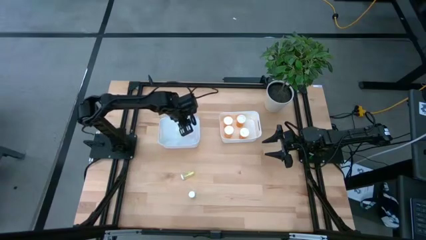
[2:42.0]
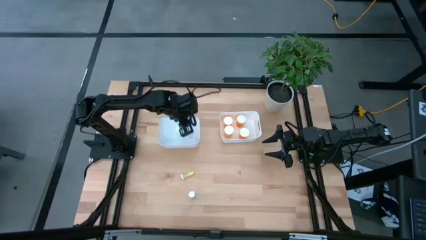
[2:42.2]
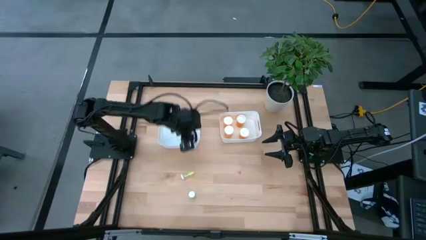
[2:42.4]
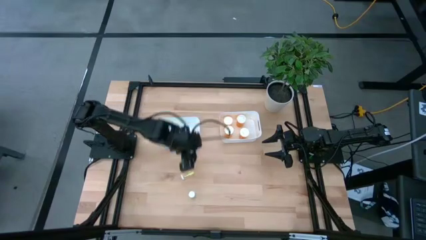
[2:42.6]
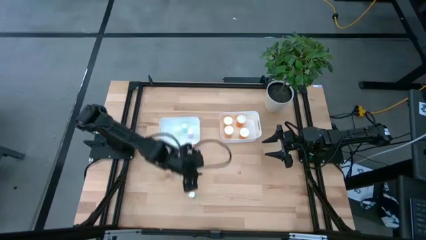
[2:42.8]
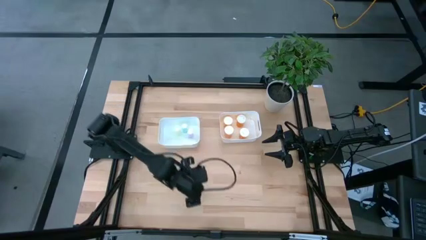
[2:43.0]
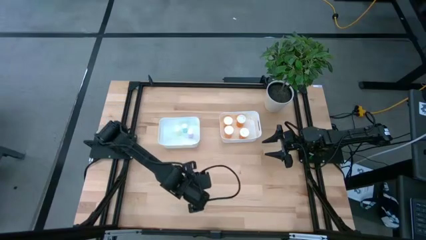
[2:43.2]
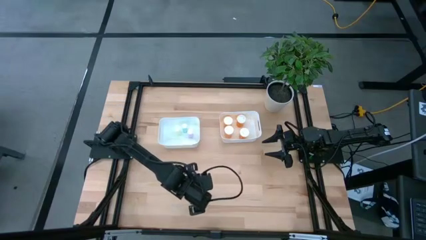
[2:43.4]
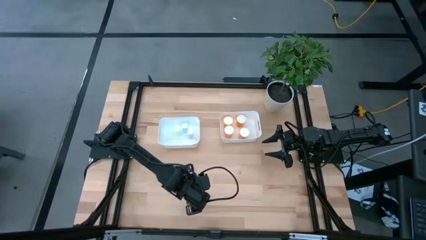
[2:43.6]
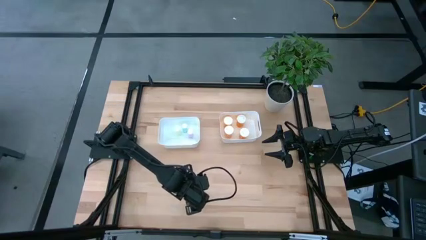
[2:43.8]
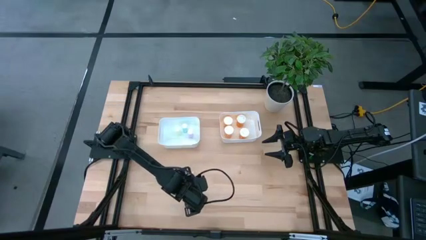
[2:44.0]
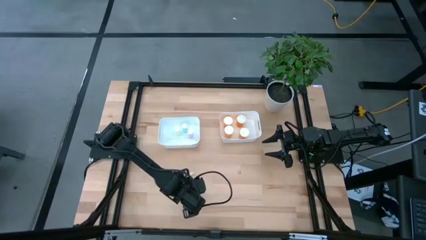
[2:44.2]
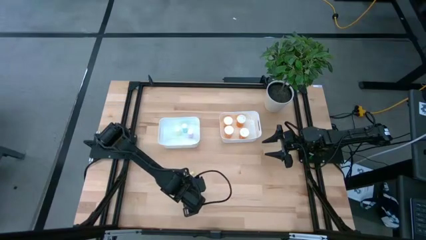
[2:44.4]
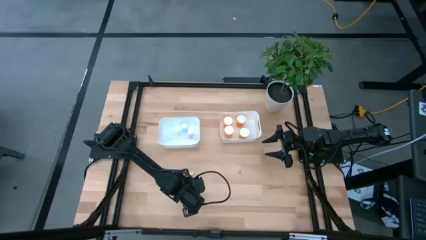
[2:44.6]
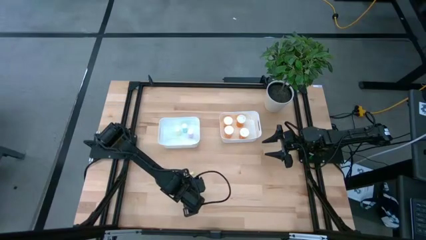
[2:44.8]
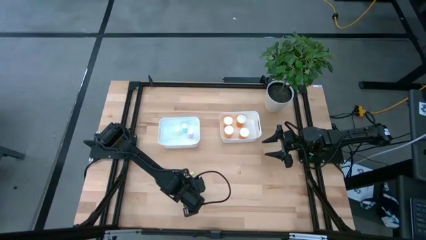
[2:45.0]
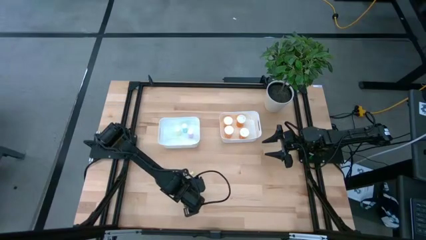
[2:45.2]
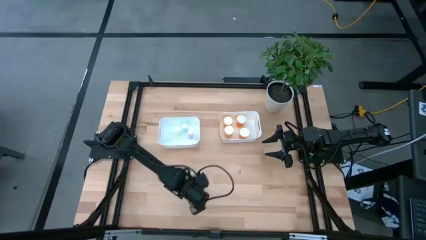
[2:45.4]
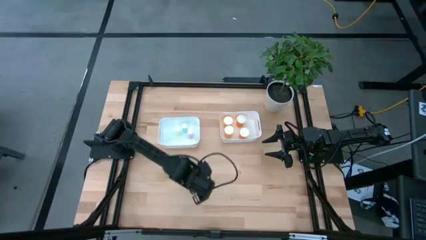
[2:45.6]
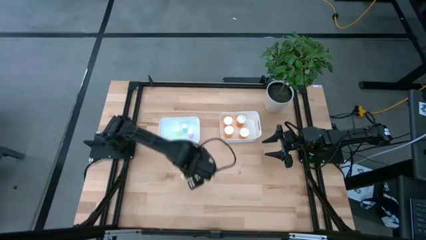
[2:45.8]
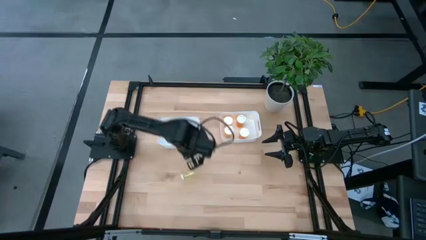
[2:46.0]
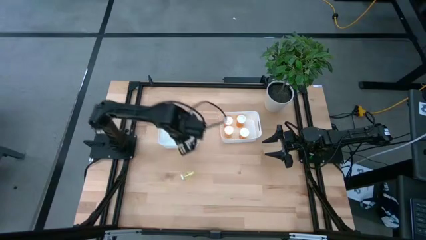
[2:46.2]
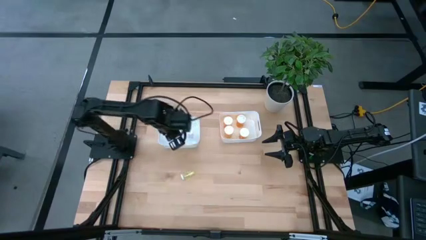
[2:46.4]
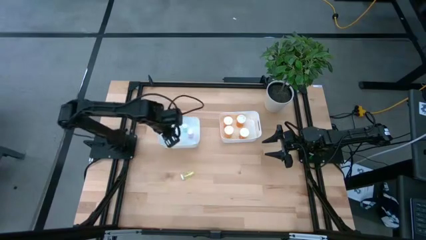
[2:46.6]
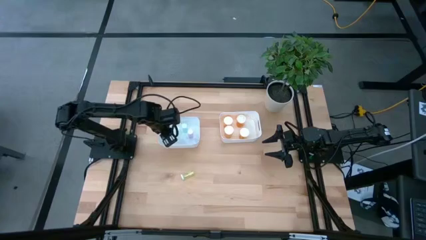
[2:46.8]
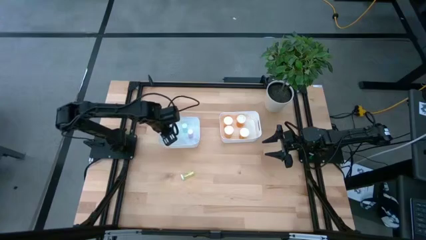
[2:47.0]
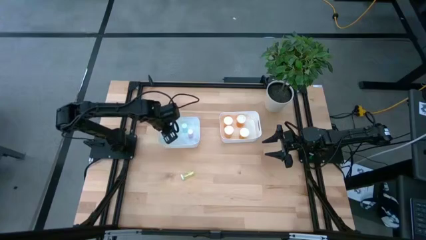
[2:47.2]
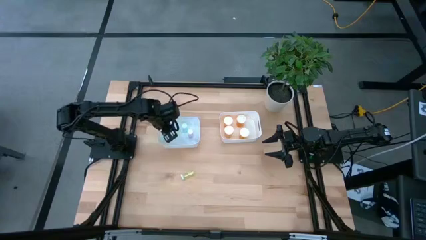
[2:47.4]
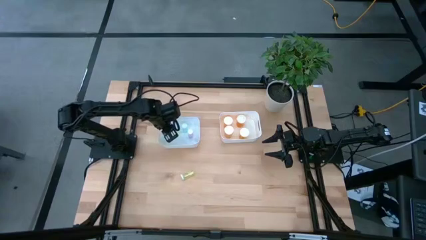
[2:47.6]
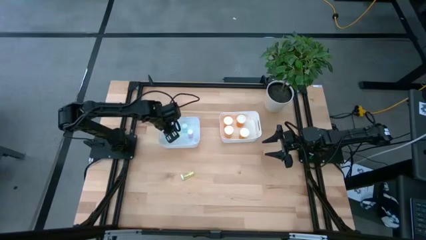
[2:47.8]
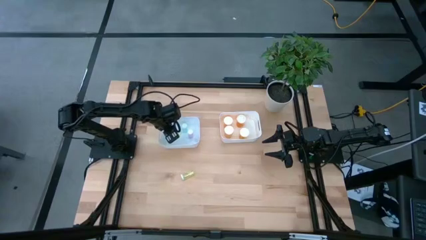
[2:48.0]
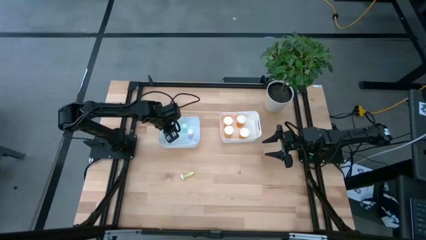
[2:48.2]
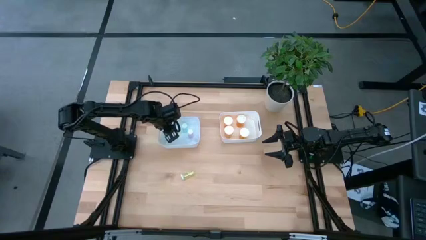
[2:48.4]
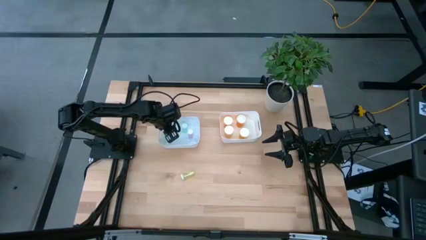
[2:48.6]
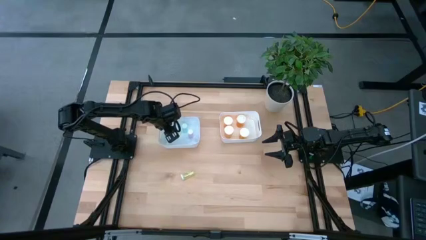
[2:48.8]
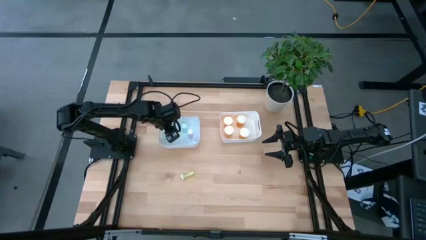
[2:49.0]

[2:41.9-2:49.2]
Task: Pick and place medicine bottles into bin by pill shape (circle, oval)
Put the blue pill bottle into the left white bin

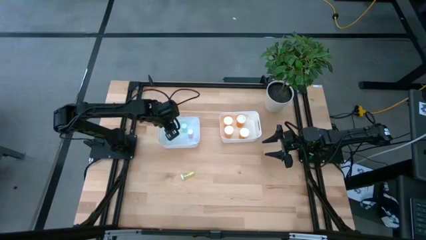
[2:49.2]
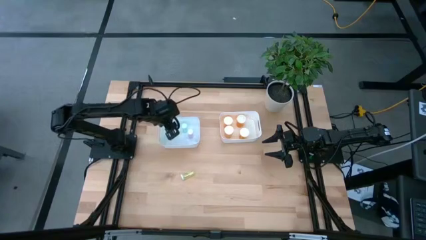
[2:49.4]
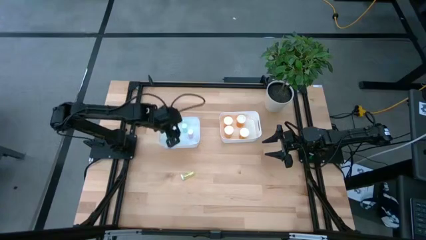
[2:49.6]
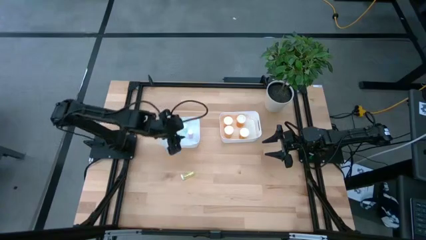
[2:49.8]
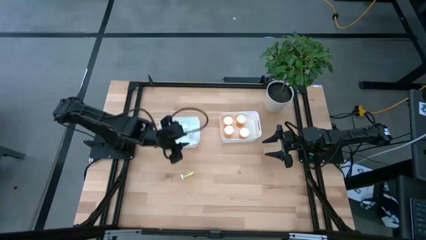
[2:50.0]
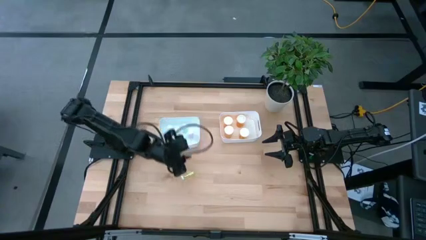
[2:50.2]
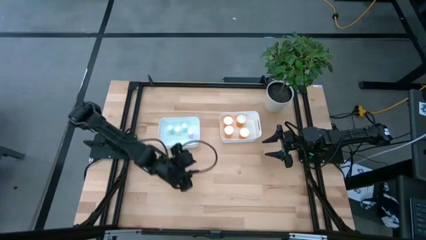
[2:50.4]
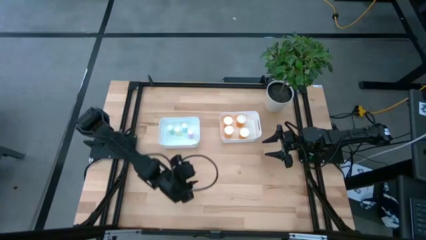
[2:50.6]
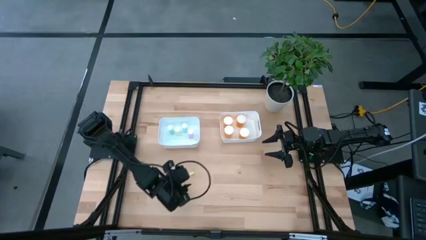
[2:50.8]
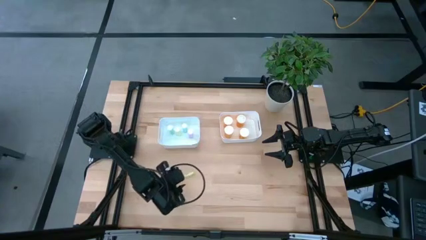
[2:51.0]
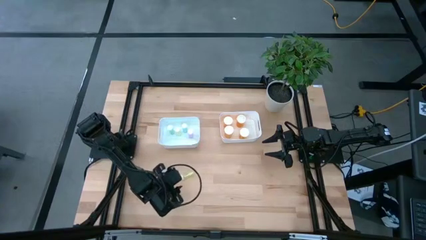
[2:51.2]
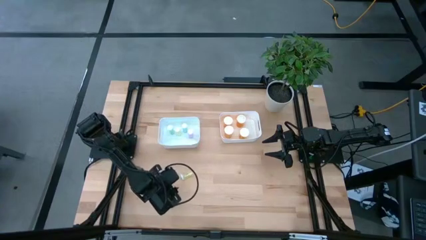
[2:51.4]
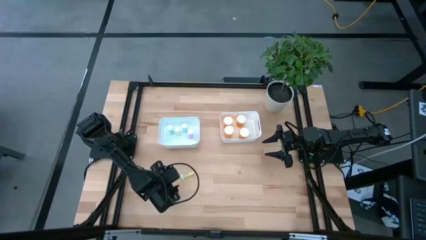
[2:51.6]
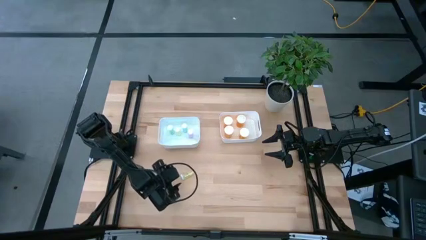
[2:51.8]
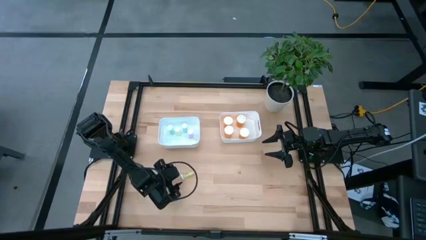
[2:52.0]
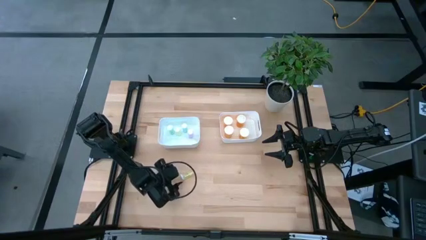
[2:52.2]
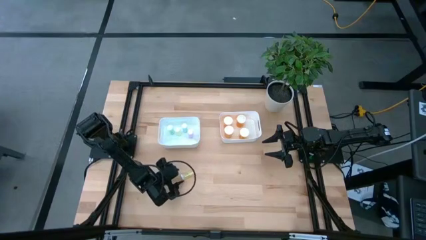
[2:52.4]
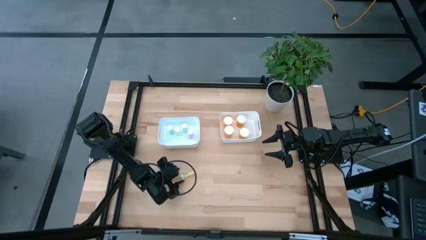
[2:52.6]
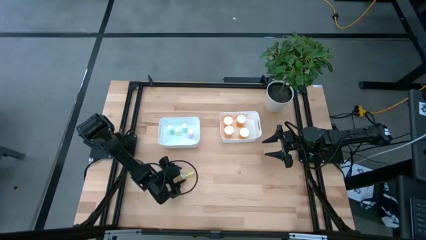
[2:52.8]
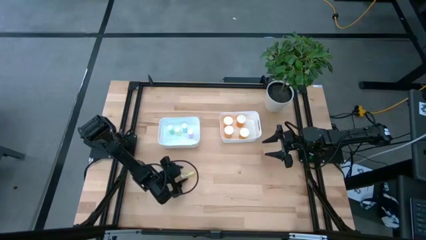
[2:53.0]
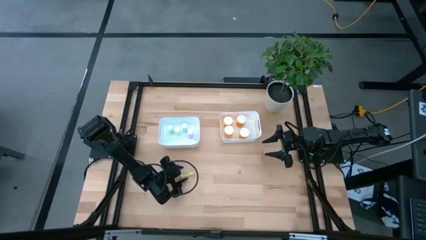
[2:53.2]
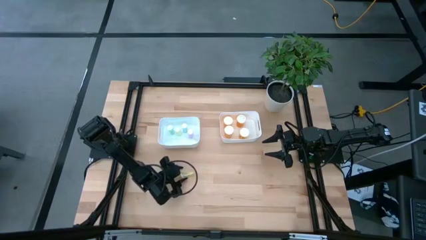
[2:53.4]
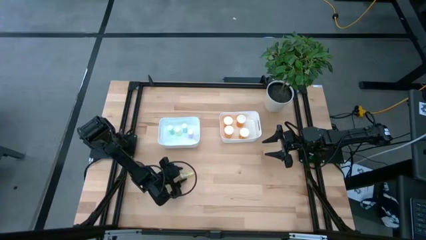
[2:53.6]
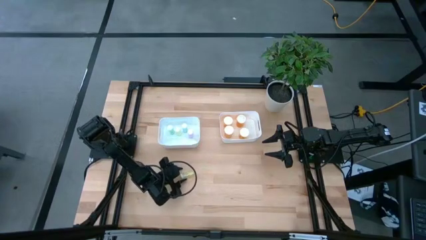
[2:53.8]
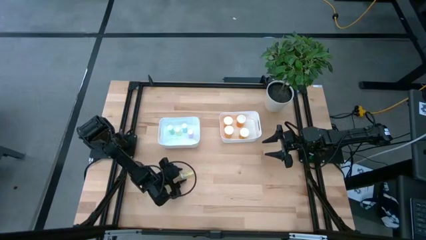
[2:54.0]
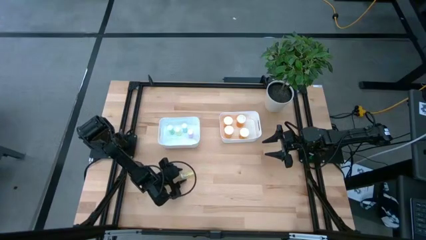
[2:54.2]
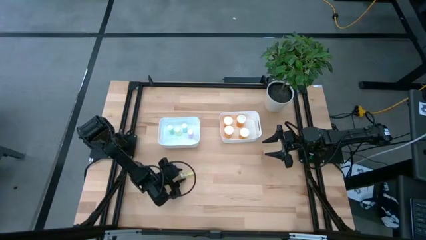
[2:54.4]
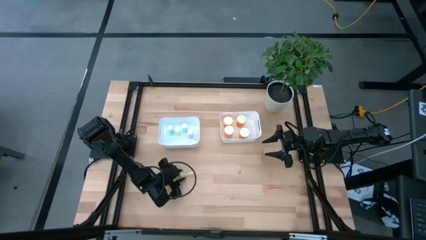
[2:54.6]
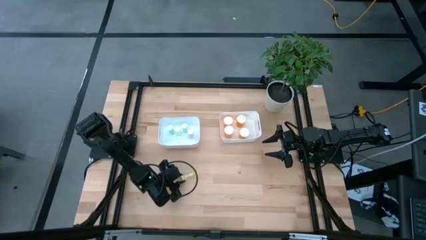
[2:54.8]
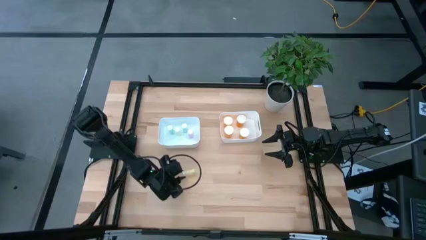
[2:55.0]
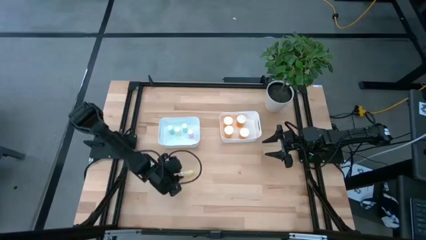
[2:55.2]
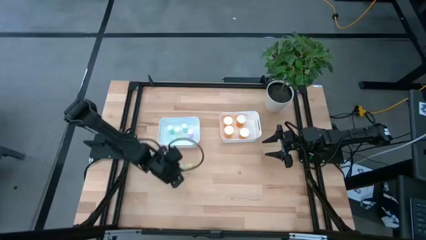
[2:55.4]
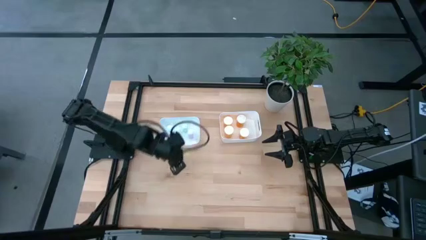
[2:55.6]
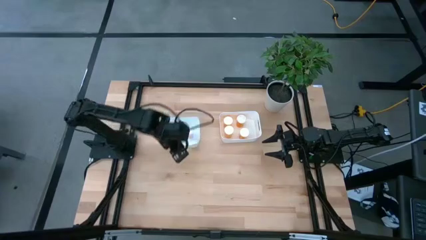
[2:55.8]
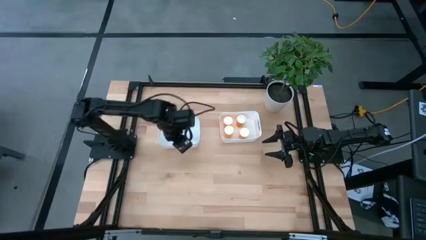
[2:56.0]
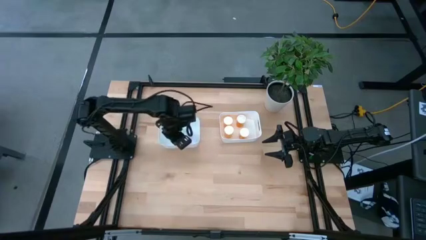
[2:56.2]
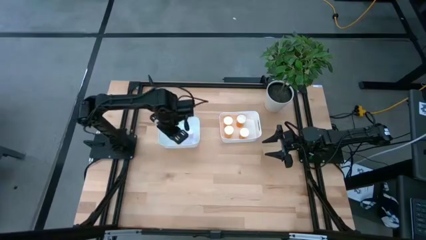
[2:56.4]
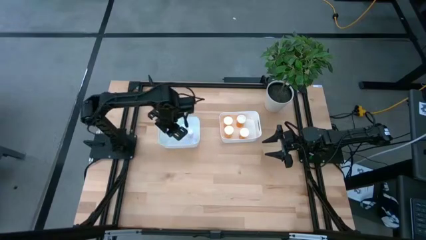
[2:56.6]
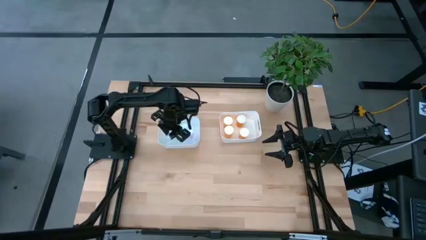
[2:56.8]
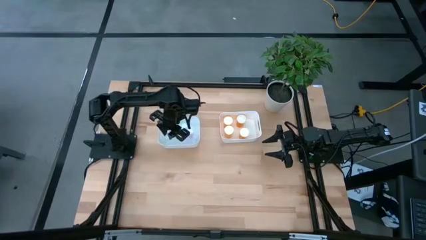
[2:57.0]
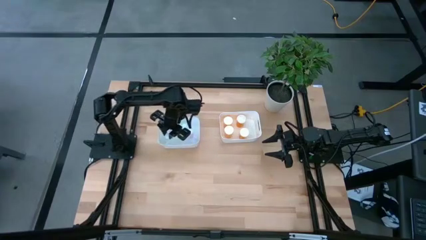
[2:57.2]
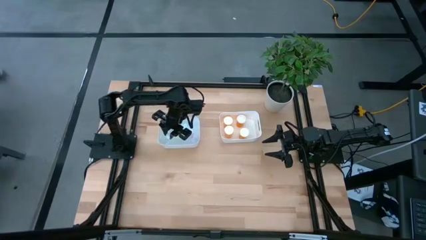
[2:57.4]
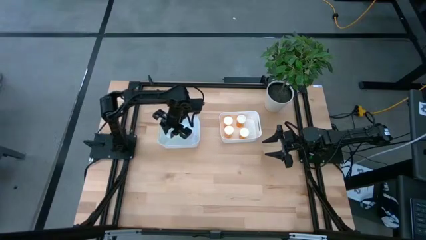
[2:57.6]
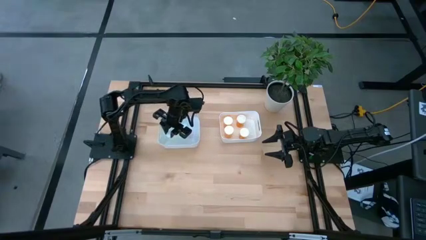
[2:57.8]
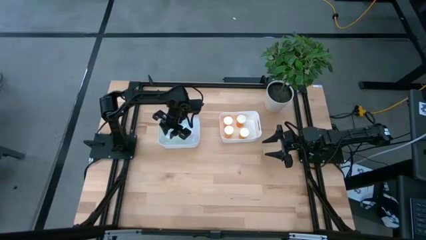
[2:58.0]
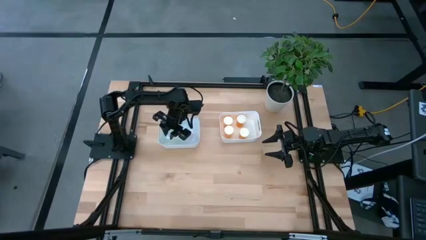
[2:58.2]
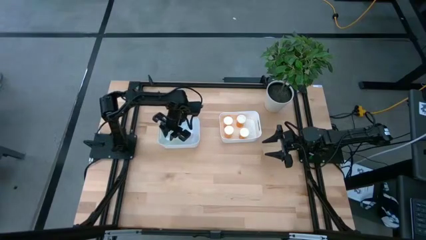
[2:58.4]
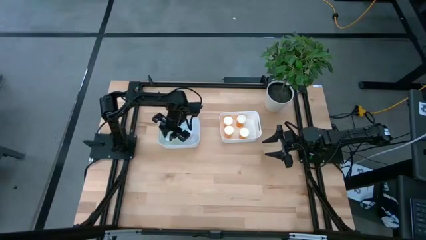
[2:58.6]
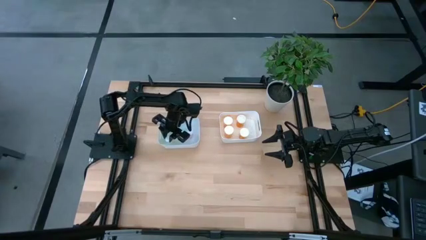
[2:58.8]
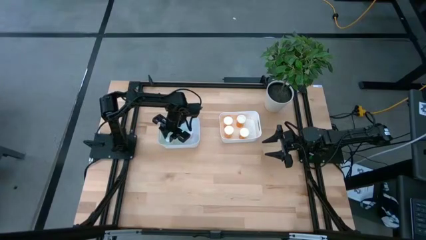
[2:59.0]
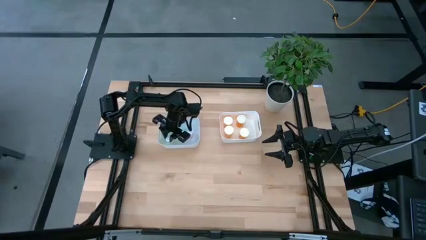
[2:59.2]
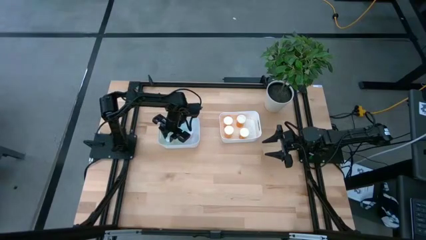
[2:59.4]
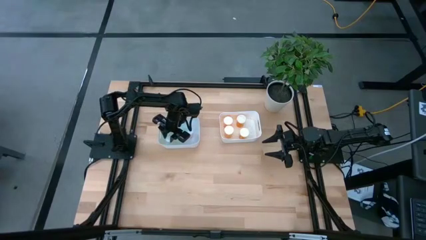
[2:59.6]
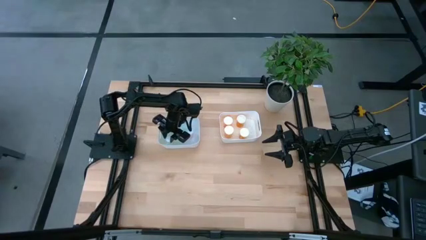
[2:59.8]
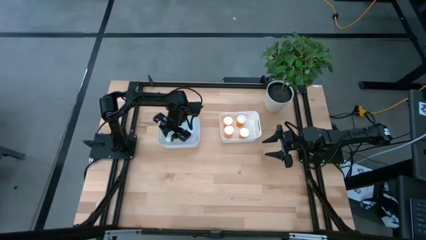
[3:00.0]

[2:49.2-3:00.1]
Put the yellow pill bottle into the left white bin
